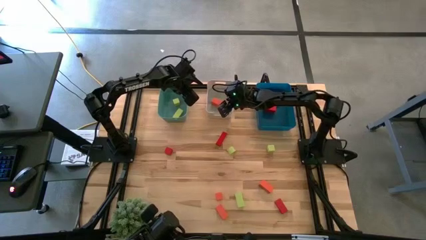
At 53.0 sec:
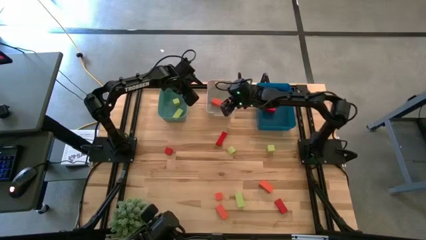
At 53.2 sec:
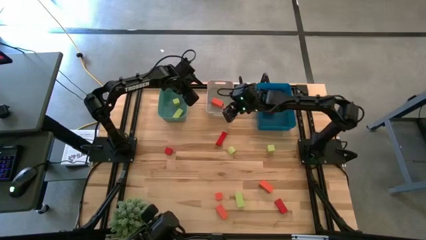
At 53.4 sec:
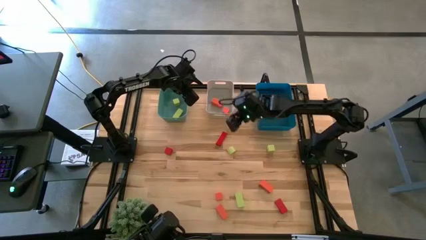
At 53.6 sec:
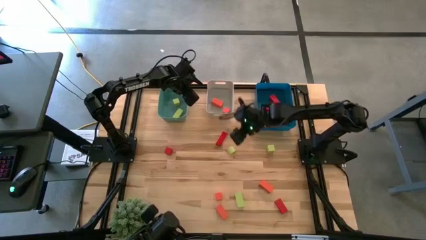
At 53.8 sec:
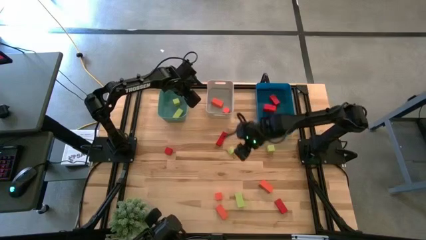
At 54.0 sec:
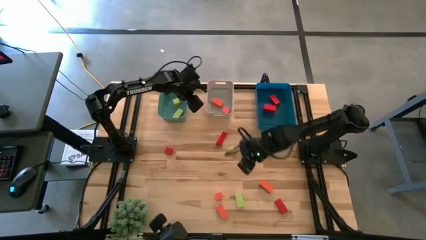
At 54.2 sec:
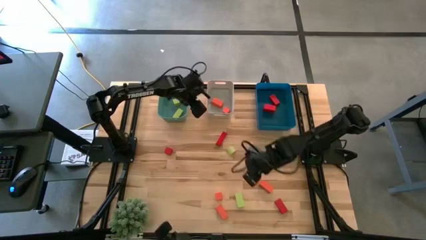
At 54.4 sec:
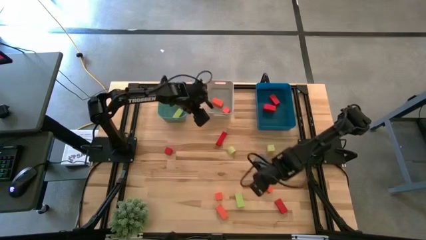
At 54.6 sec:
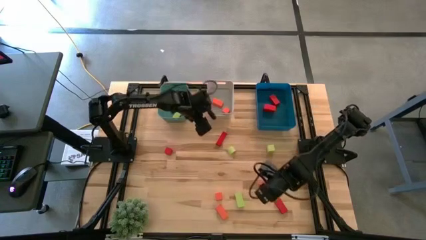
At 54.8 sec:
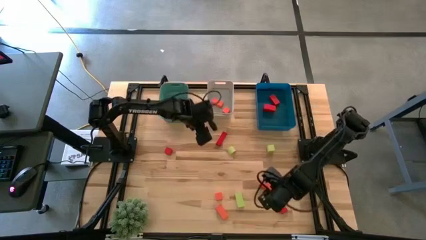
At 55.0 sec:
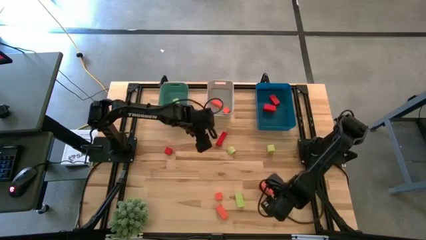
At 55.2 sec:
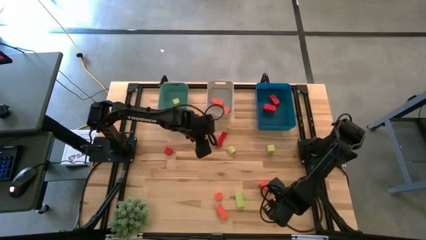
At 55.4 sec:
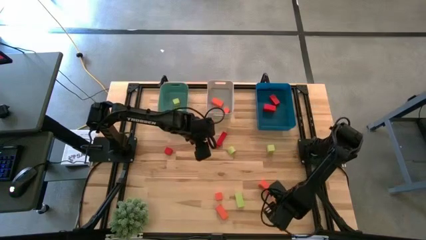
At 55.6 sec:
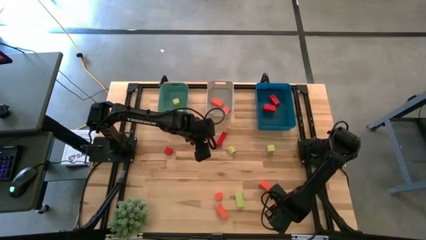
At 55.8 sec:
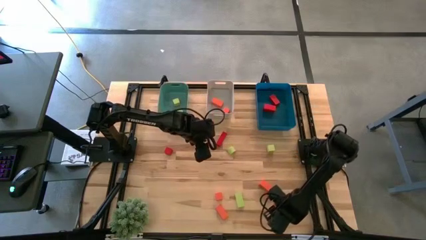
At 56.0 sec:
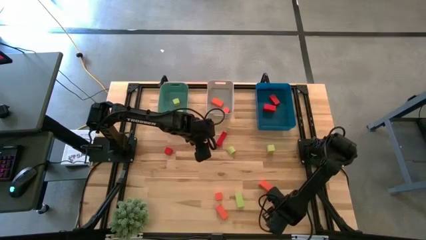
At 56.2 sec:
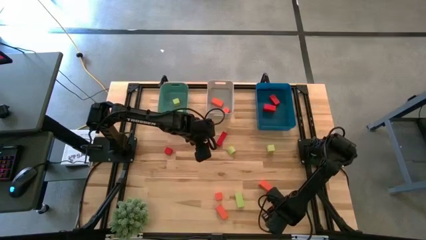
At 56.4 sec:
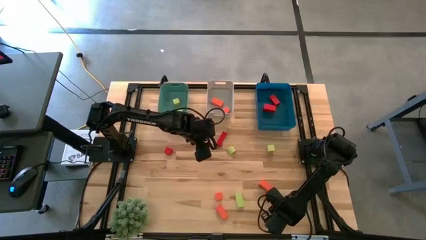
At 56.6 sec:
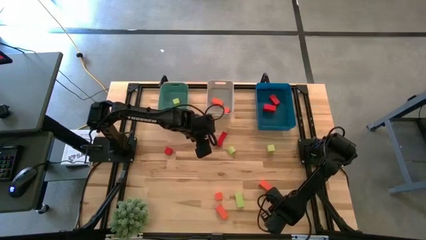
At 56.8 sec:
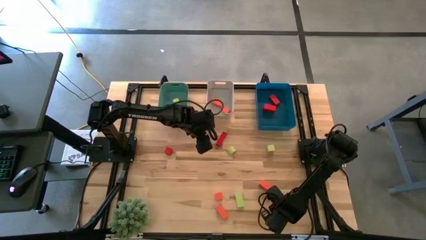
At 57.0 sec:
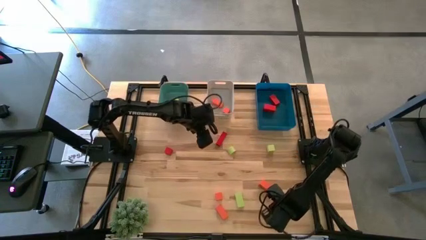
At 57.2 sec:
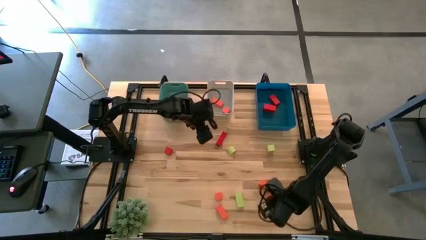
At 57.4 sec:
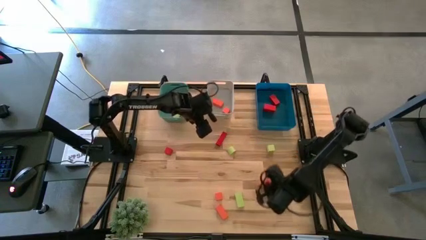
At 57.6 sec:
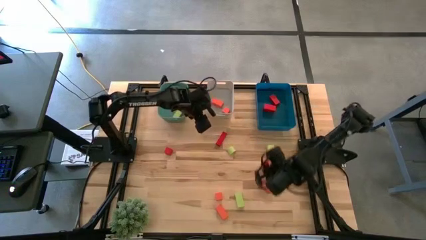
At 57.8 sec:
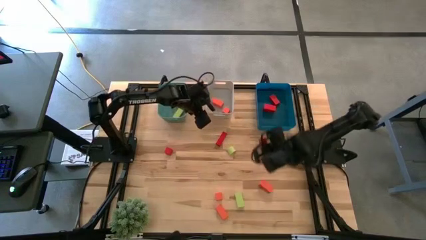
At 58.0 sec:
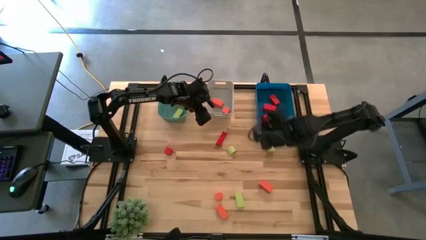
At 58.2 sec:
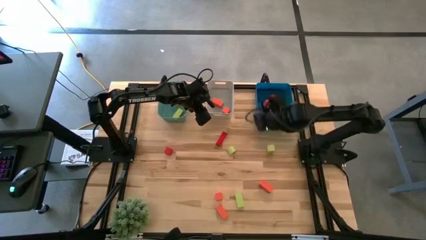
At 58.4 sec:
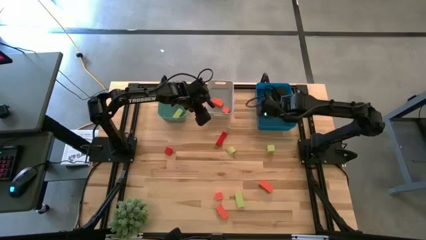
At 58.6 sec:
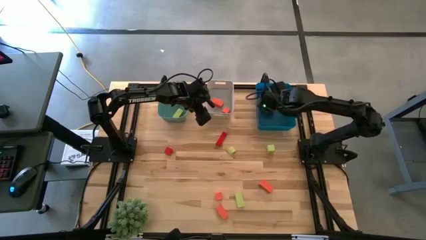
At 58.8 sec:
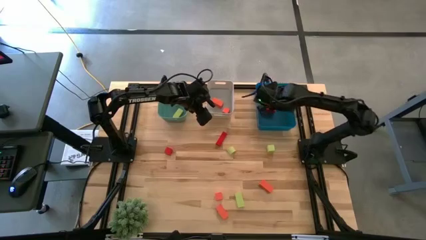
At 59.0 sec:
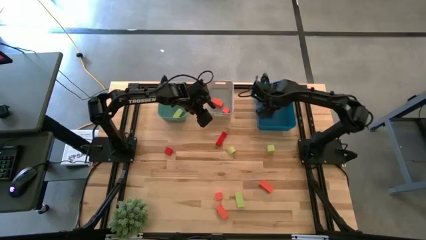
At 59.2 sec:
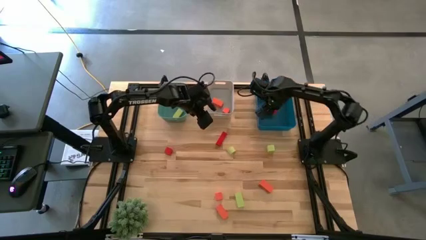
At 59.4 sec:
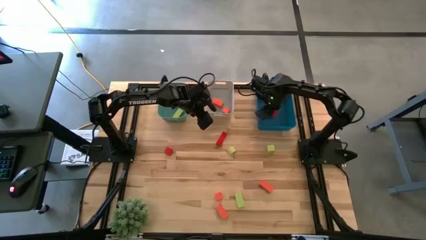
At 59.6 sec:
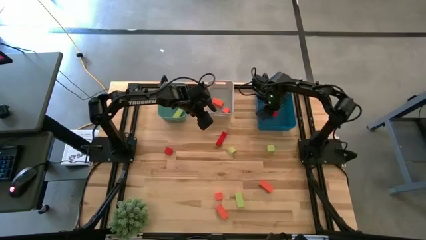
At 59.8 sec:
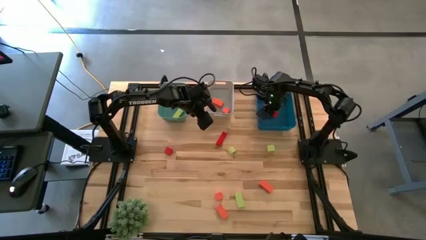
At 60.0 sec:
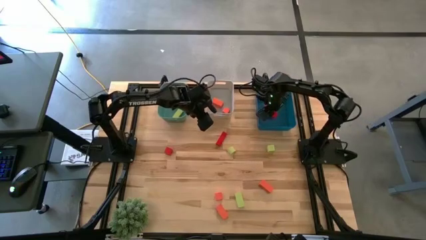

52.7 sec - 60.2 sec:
Task: Sort & place blocks by color
Put the red block into the blue bin

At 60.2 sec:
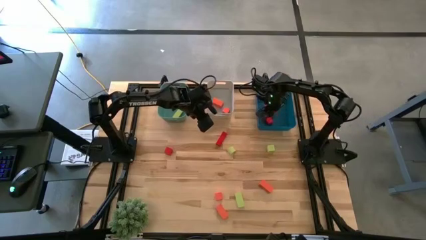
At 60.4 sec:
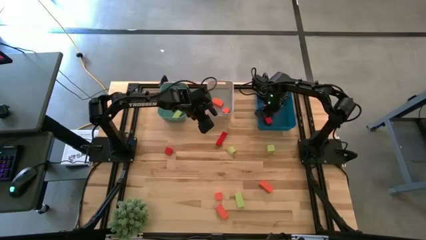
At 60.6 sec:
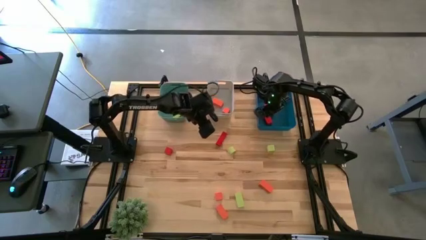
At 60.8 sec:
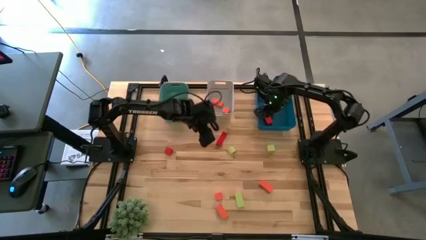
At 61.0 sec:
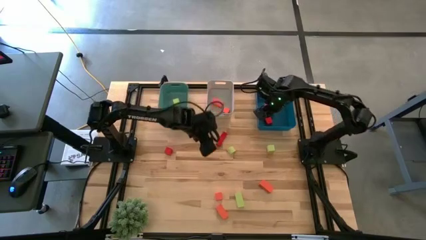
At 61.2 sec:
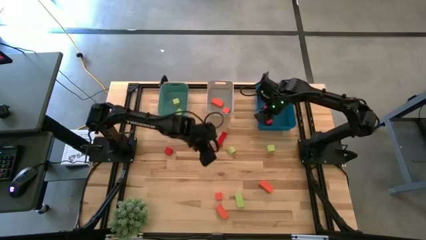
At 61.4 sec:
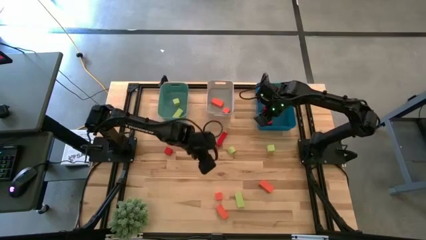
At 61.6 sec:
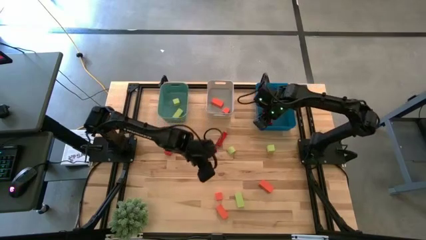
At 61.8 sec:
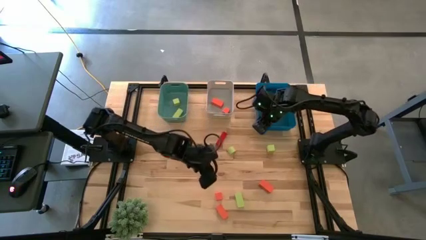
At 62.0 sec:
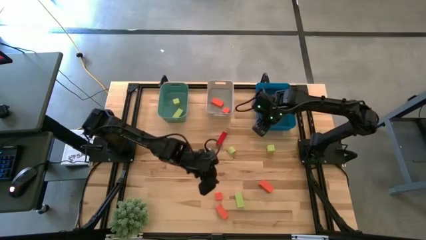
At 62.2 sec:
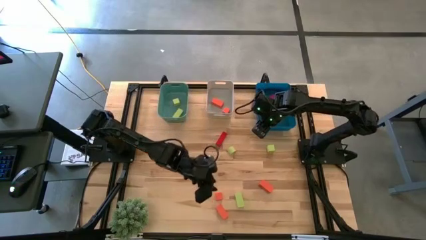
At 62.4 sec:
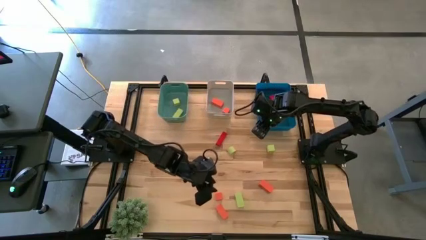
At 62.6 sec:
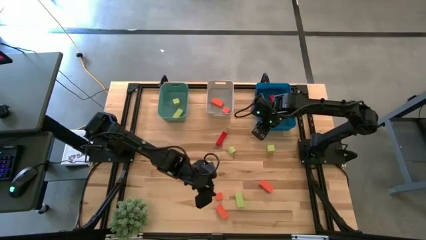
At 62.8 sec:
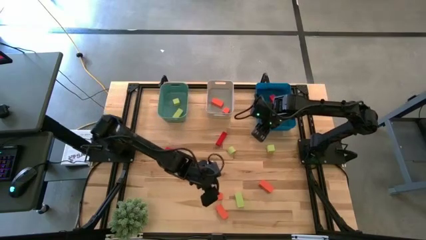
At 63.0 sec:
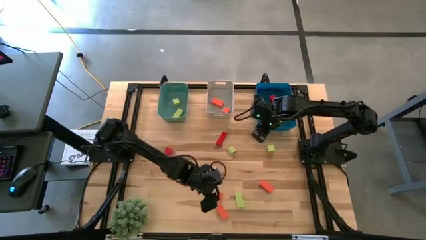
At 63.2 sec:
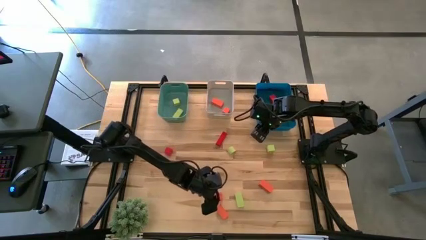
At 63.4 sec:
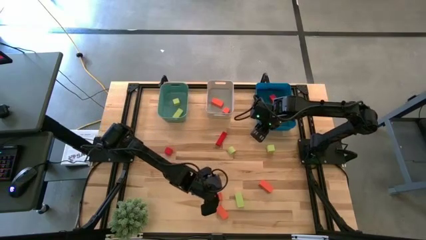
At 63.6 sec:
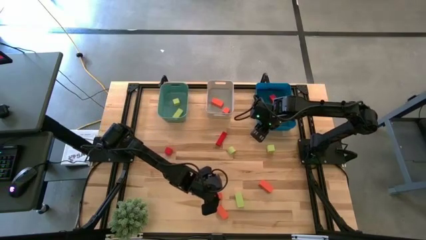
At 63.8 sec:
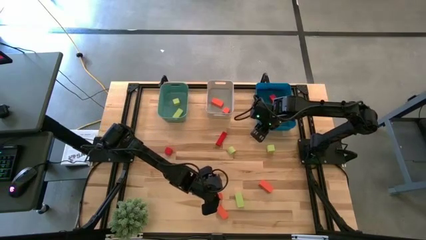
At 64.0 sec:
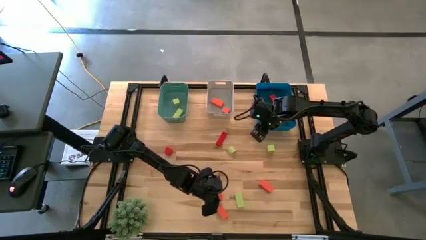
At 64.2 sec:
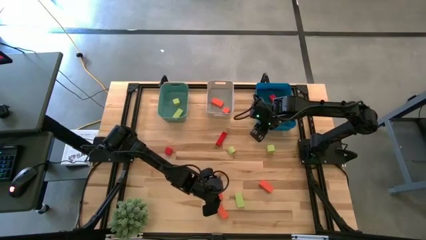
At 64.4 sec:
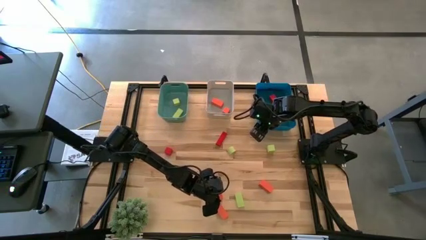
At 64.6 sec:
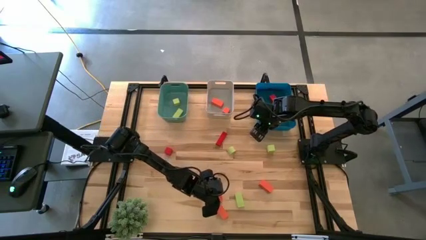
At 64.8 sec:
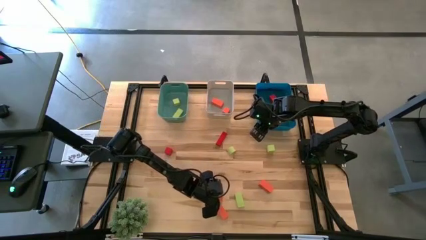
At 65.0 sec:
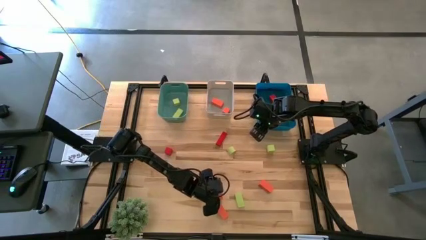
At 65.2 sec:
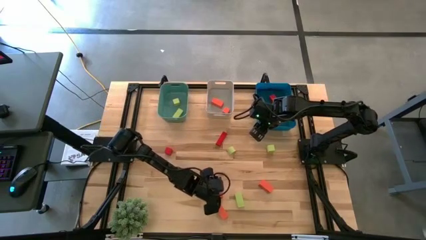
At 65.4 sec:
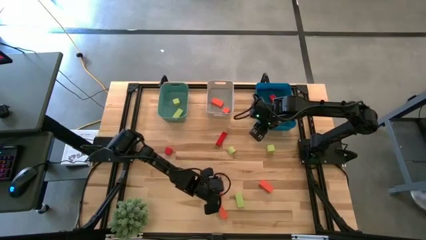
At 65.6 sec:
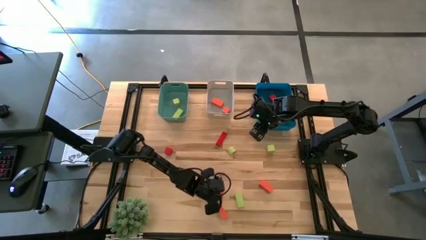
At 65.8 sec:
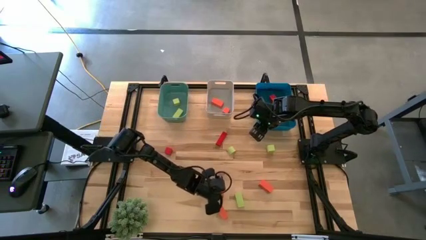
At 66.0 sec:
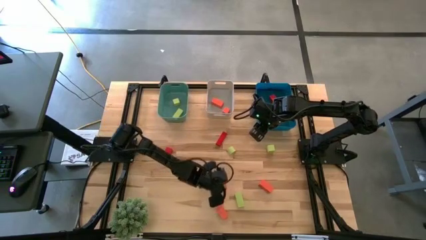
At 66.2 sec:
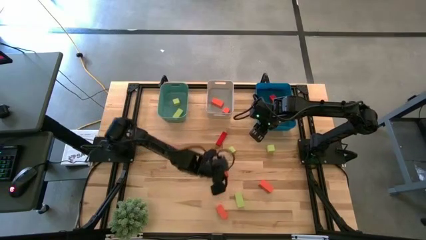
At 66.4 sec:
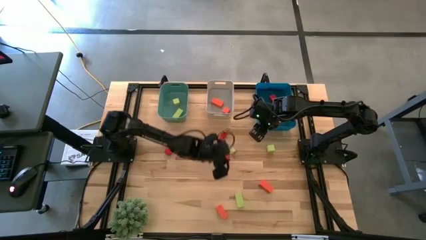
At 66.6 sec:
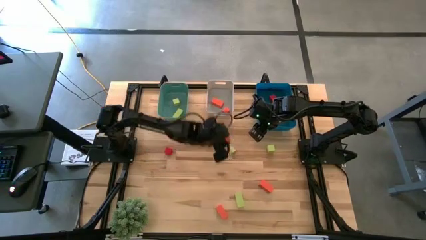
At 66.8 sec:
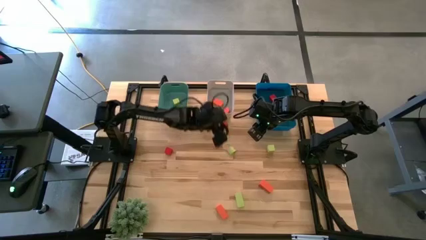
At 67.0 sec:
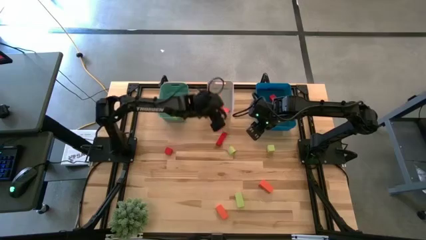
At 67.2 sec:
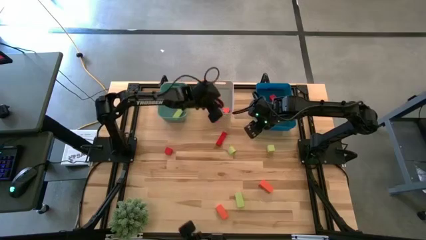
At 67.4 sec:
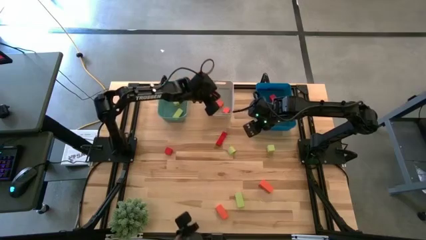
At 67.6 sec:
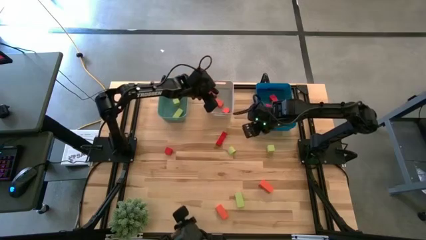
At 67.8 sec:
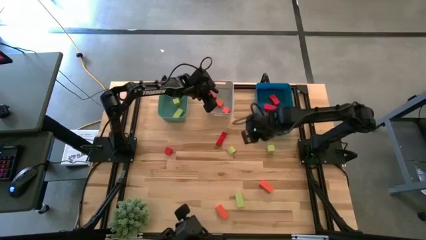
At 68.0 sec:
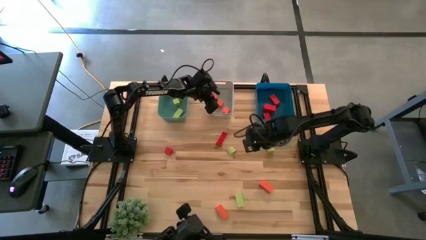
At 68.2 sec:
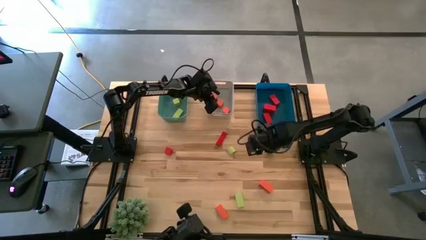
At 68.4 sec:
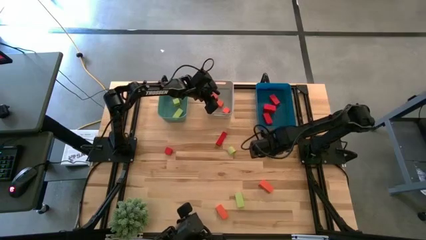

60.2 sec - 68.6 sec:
Put the orange block into the gray bin

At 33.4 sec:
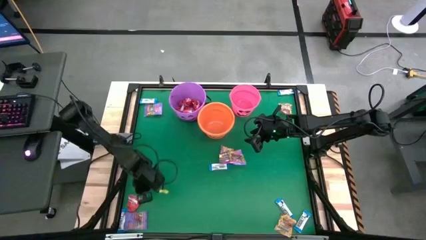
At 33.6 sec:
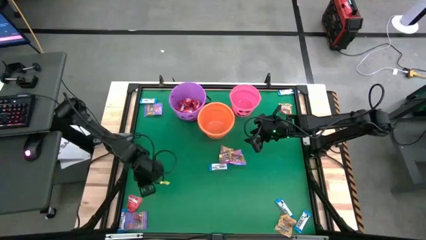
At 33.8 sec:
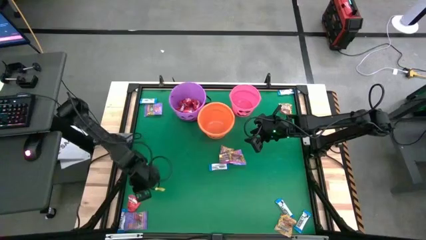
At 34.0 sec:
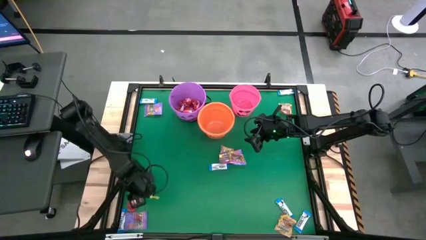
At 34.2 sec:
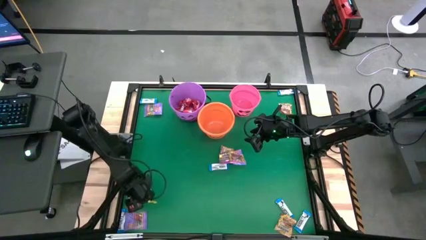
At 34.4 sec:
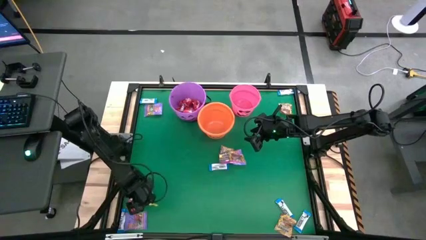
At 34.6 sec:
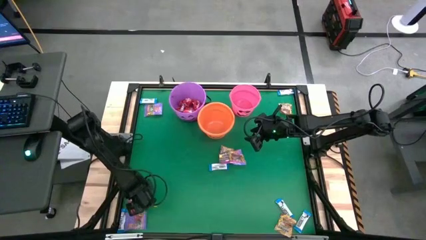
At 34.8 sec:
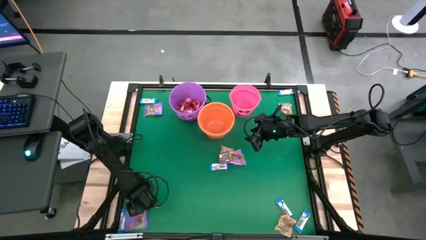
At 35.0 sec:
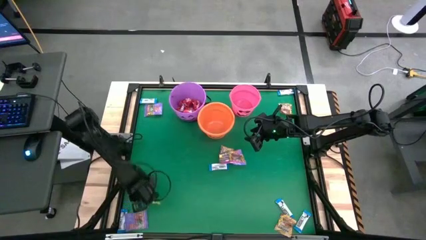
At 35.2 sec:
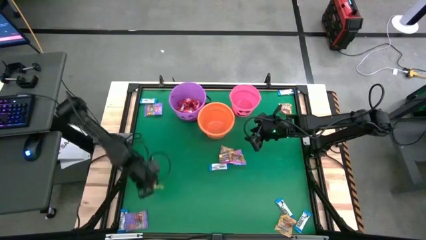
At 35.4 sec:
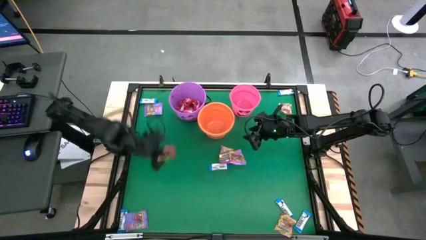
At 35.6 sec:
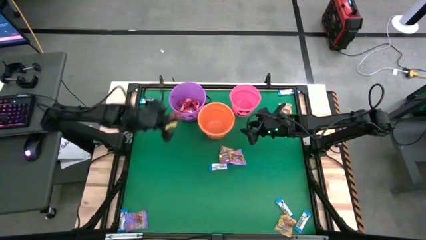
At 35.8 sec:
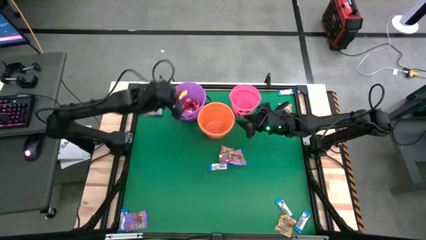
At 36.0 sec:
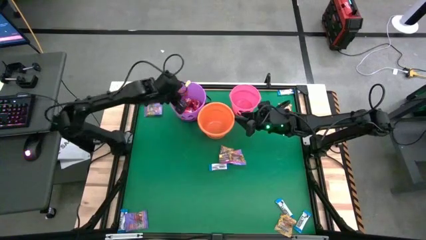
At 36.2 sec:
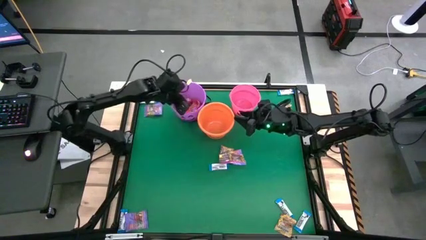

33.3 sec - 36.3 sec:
Task: Sort candy by brand, put in halloween buckets
Put the red candy into the purple bucket
